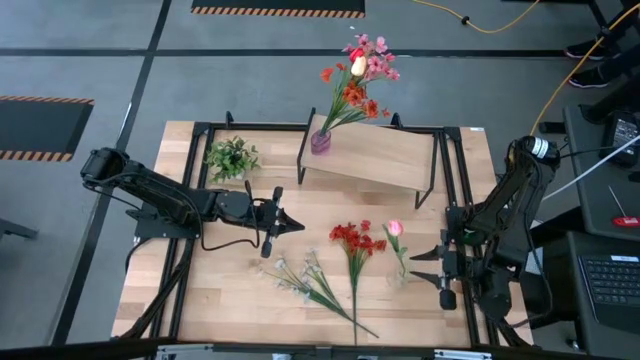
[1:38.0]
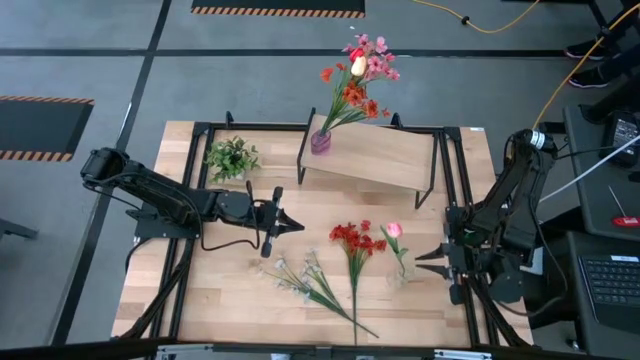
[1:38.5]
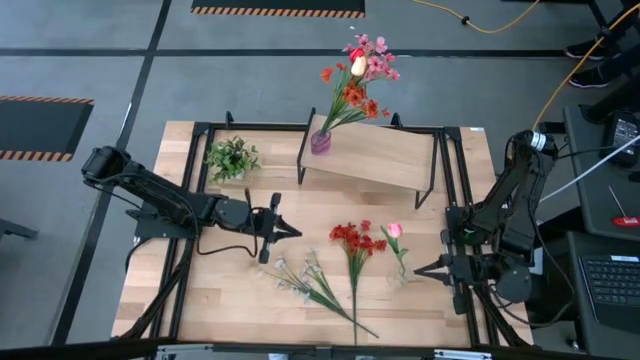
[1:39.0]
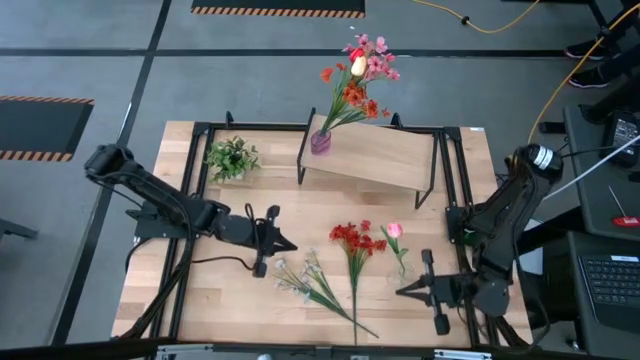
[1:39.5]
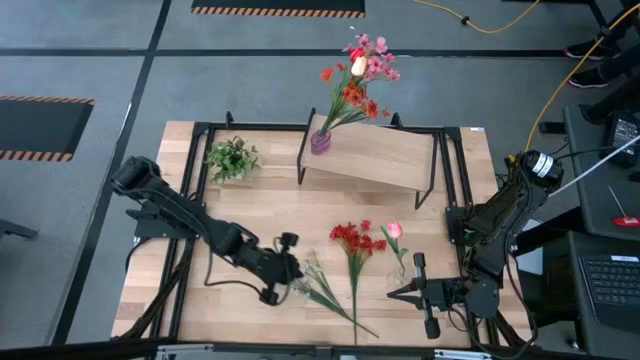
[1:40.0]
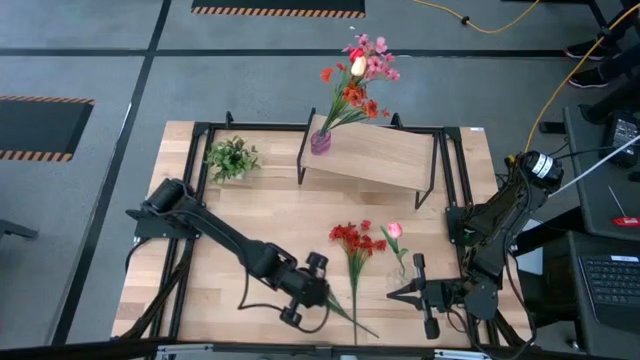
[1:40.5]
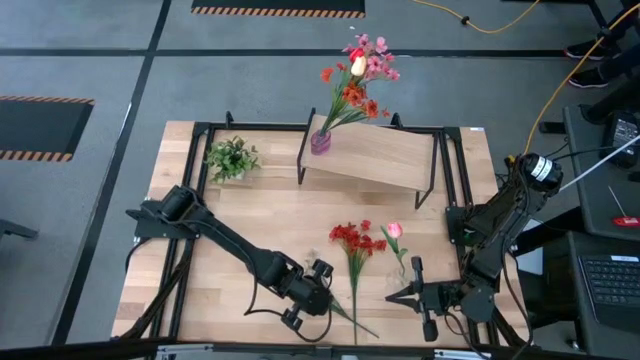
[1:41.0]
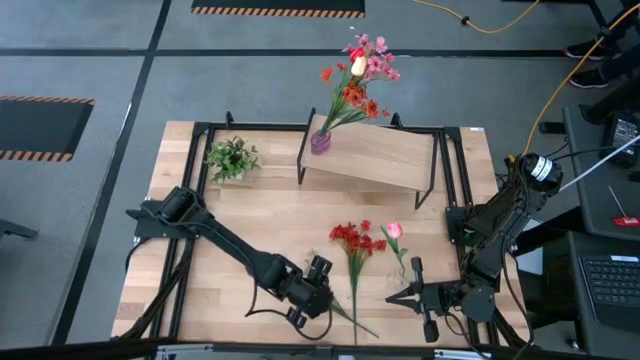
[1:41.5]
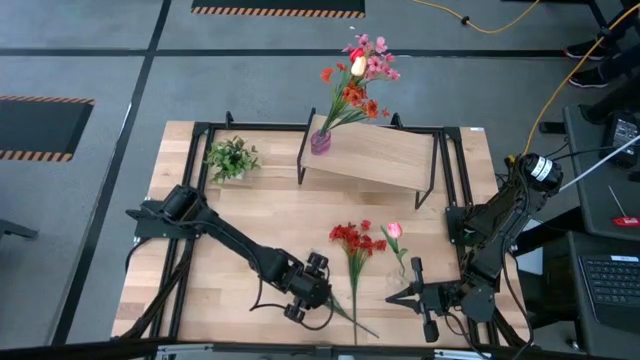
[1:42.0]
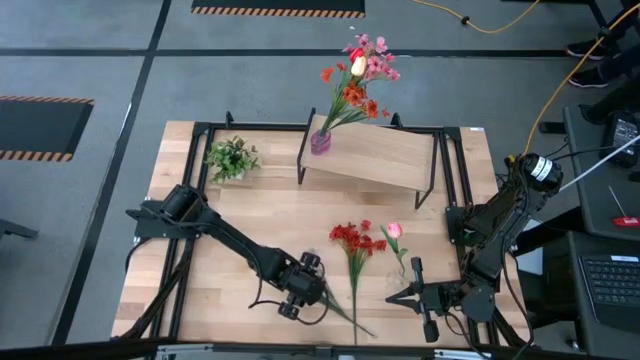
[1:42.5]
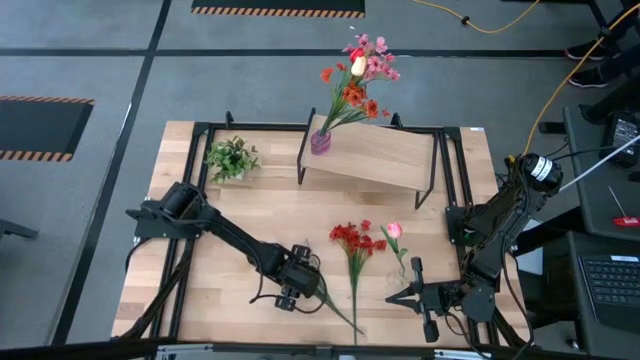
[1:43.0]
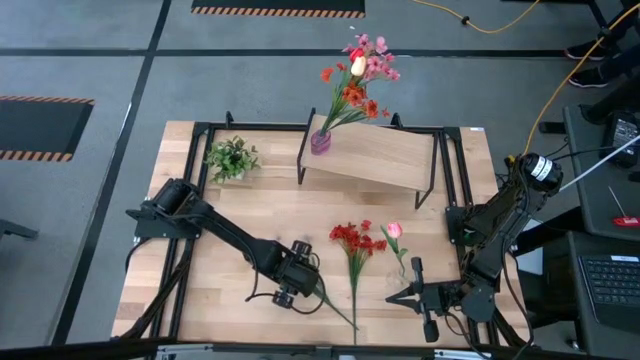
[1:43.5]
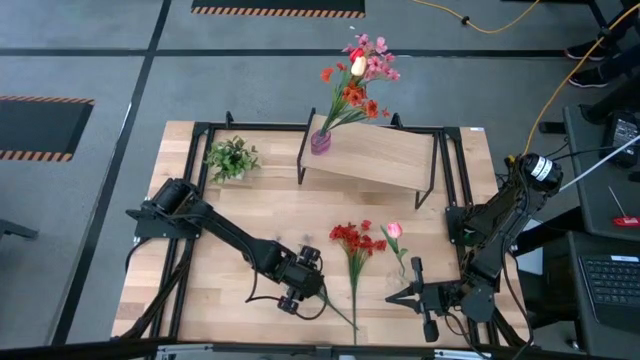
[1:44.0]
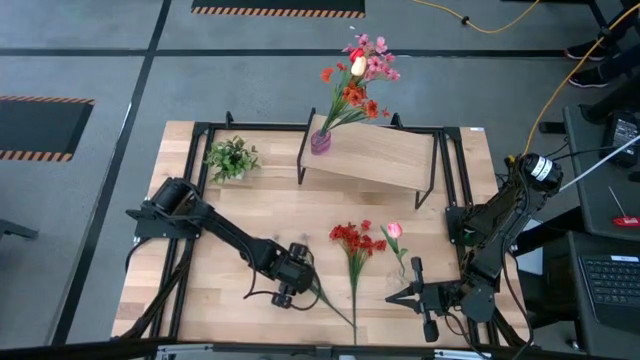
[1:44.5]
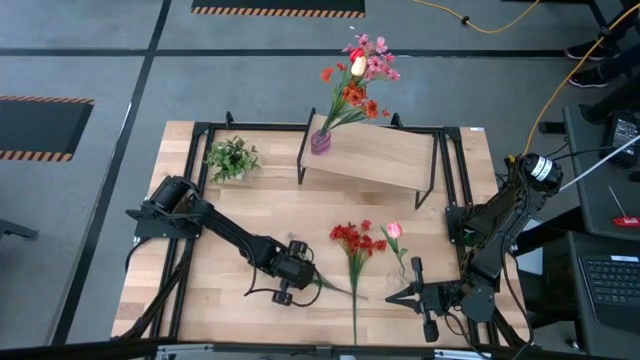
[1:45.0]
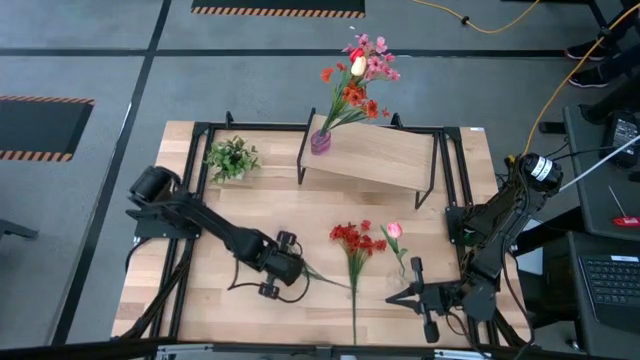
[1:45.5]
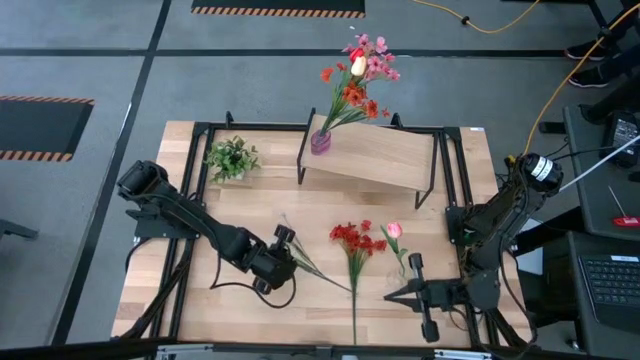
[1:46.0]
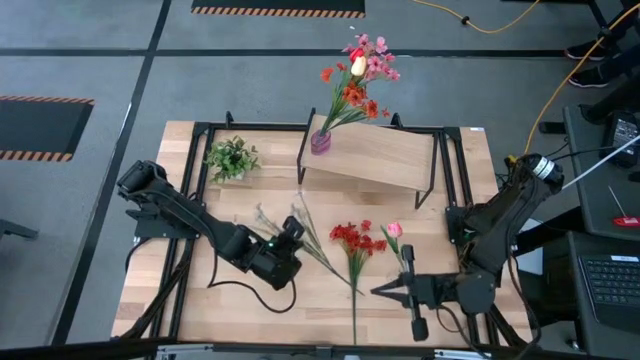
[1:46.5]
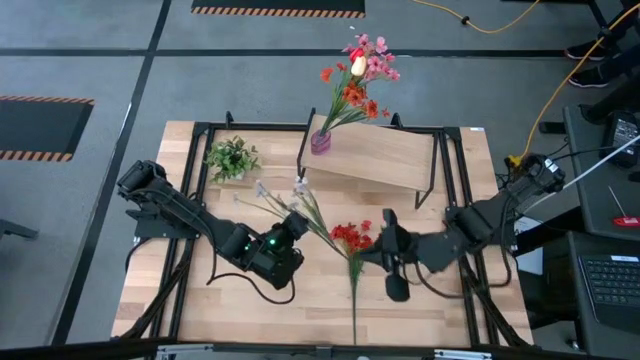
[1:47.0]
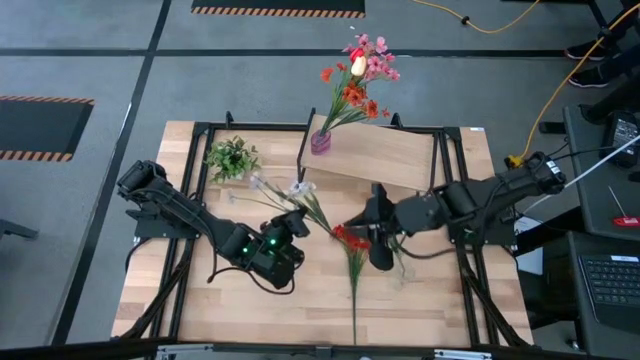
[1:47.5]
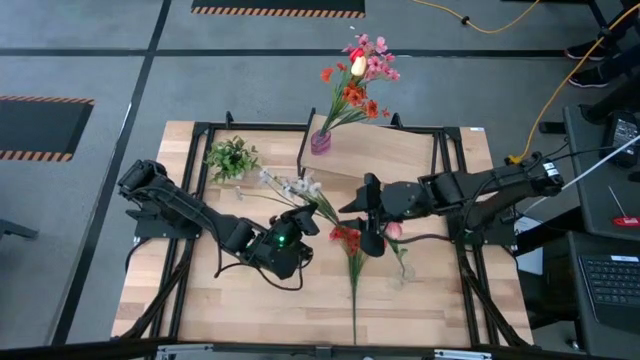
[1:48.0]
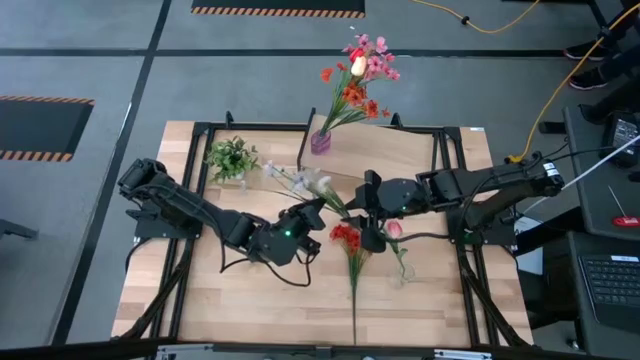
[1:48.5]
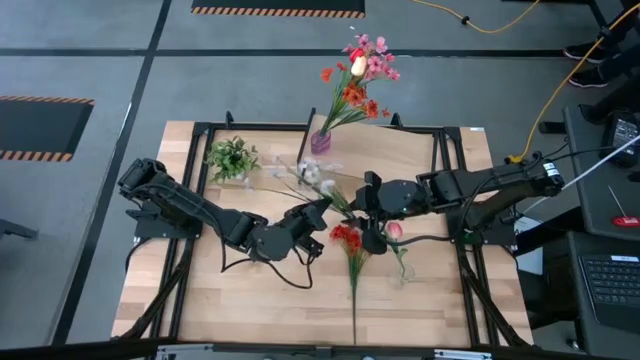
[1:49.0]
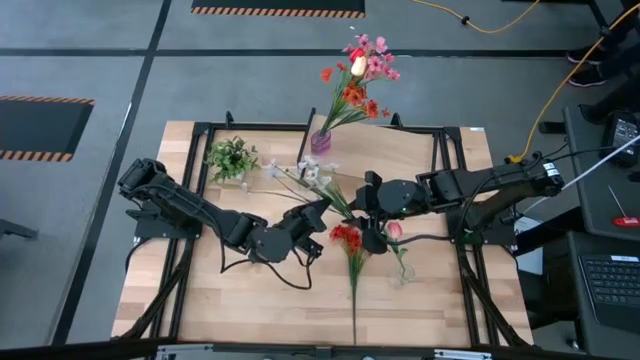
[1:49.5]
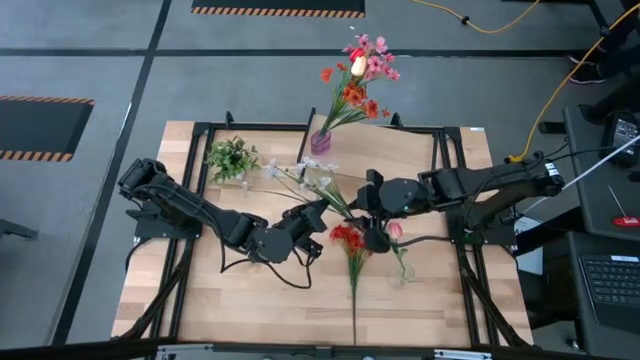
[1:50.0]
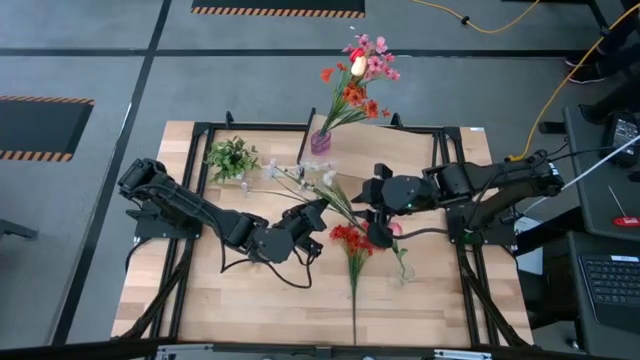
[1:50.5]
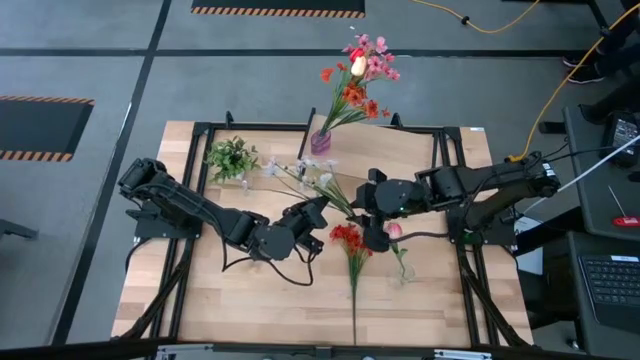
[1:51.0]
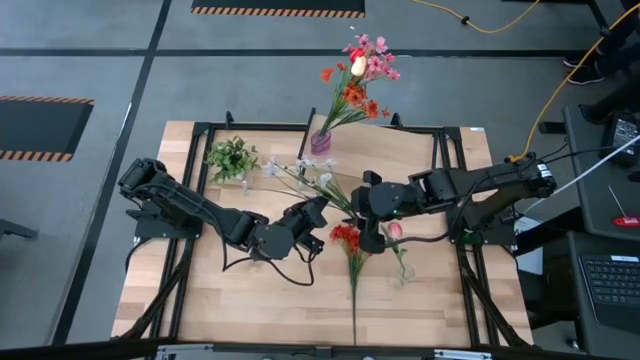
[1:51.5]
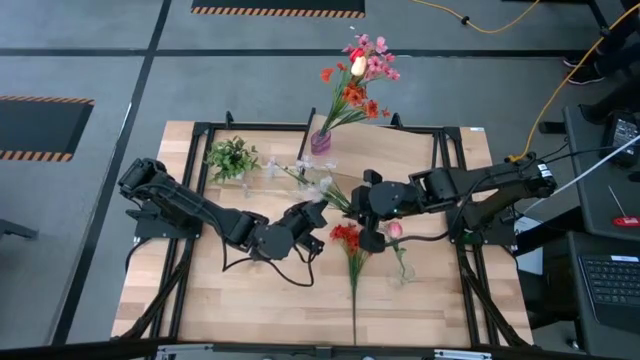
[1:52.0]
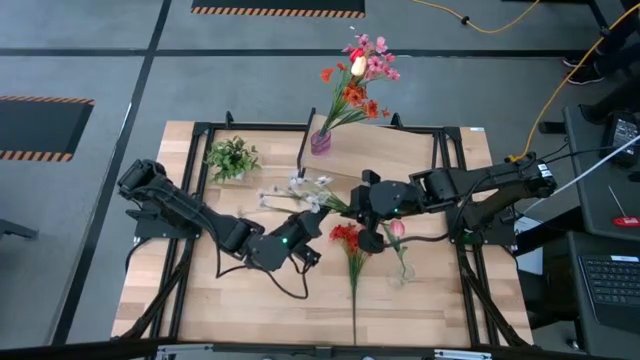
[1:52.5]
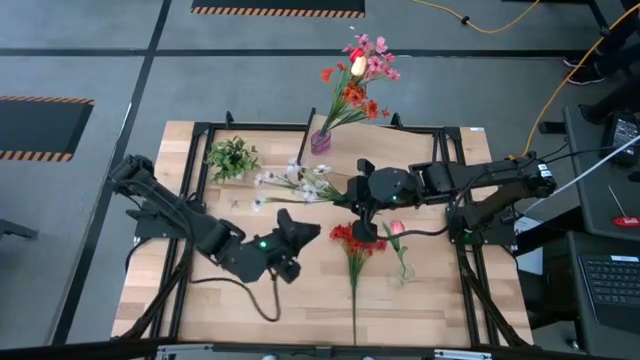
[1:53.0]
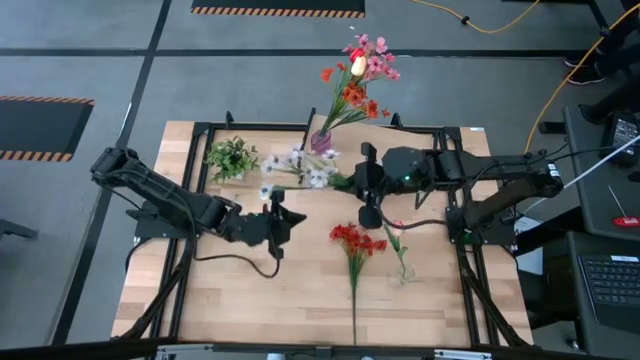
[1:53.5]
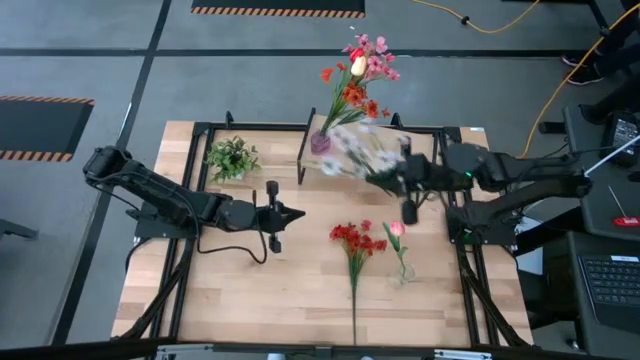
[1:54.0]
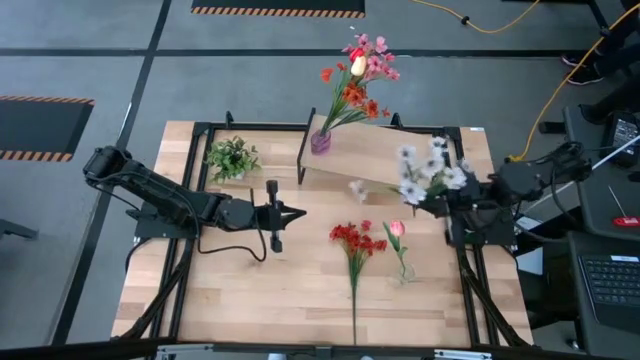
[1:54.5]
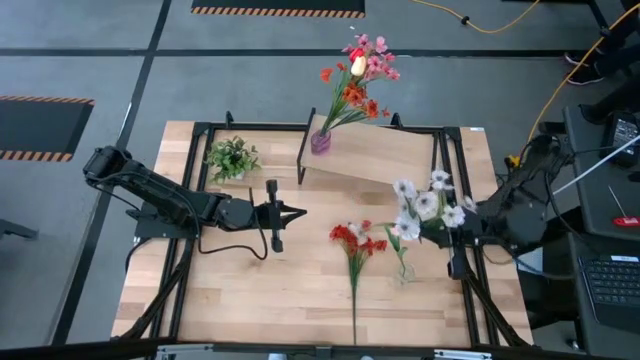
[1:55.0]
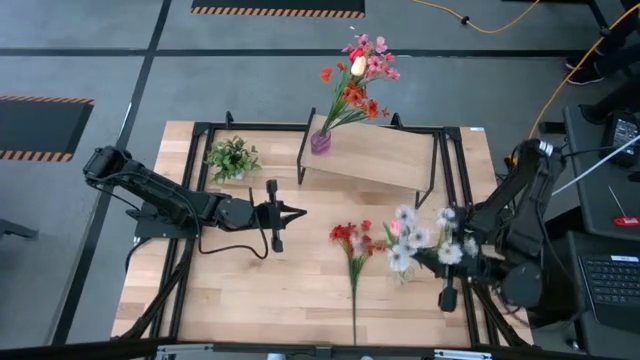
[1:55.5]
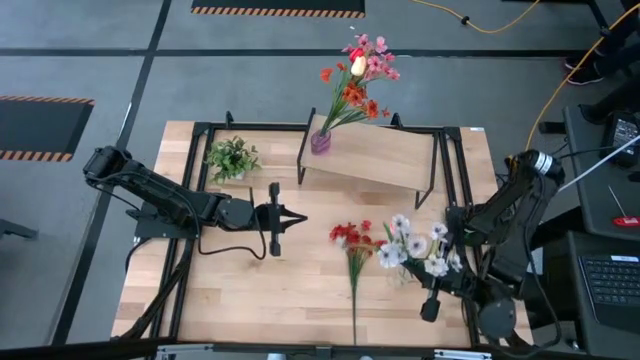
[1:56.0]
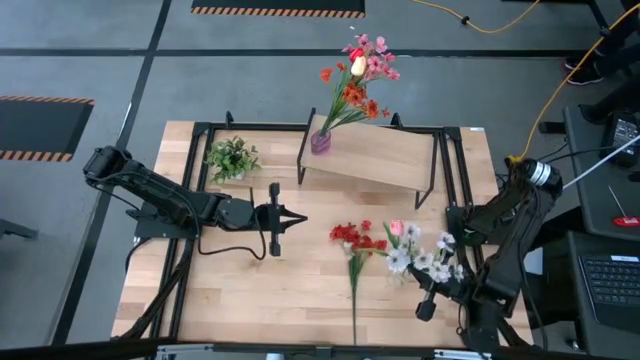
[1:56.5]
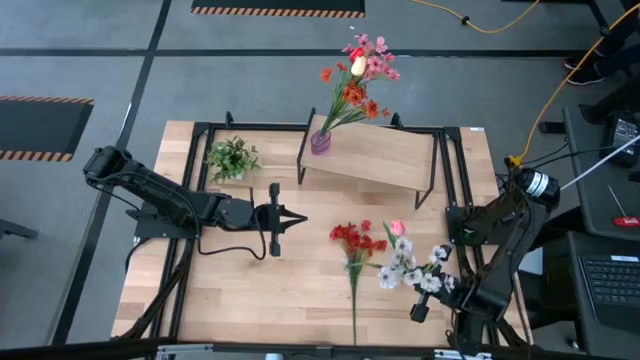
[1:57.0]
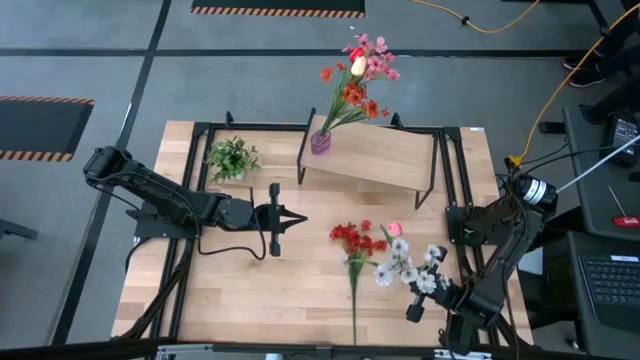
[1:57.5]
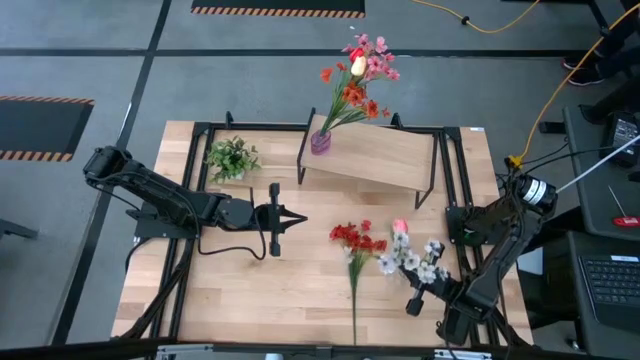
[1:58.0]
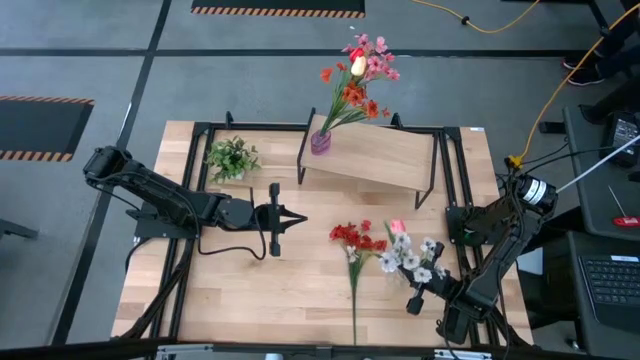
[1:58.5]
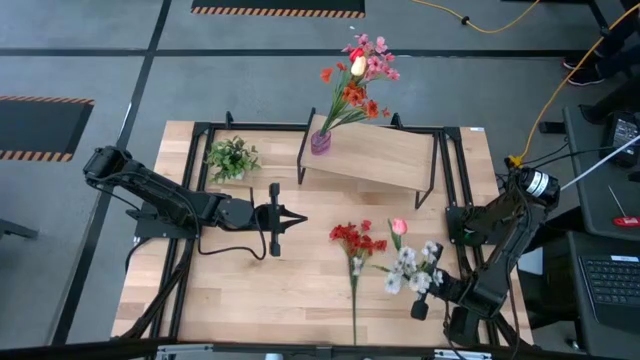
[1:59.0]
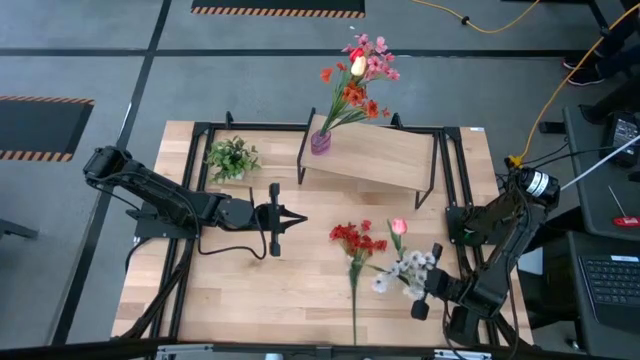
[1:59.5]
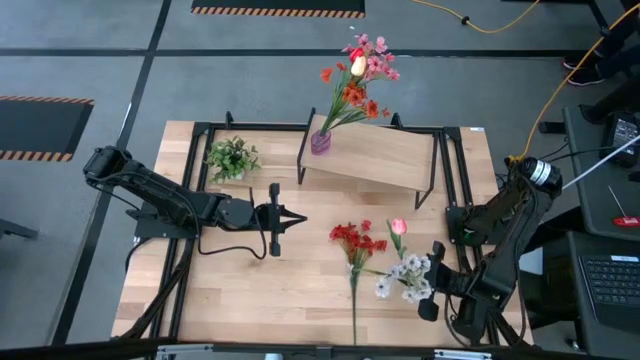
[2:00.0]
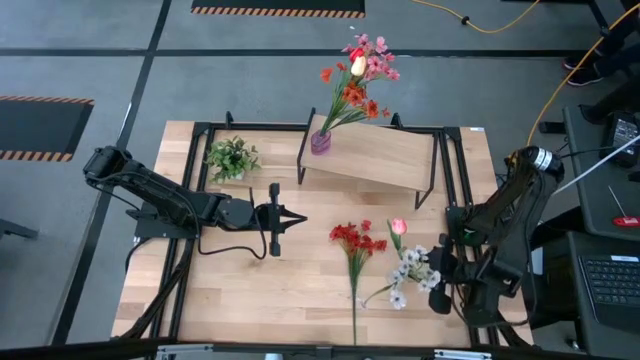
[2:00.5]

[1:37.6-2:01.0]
Task: Pick and place flowers into a vace then onto a shelf
Put the white flowers into the transparent vase
